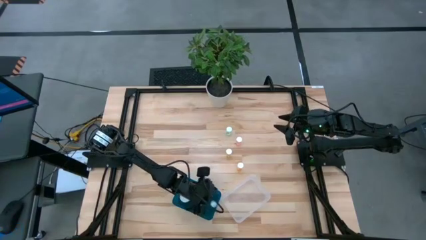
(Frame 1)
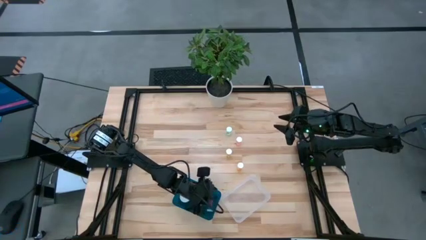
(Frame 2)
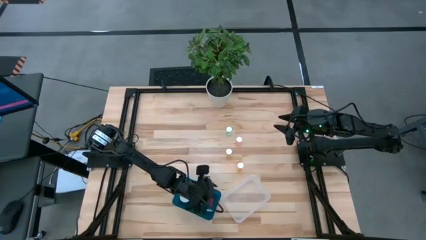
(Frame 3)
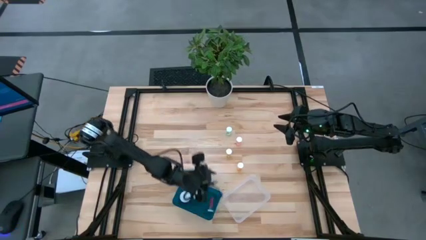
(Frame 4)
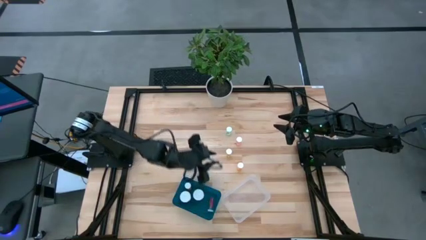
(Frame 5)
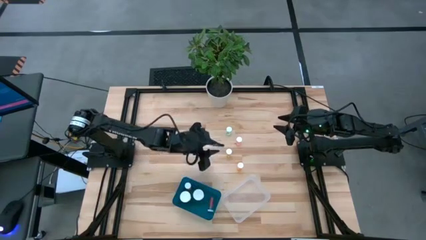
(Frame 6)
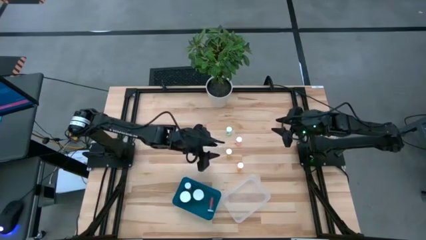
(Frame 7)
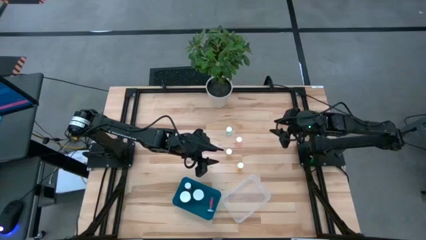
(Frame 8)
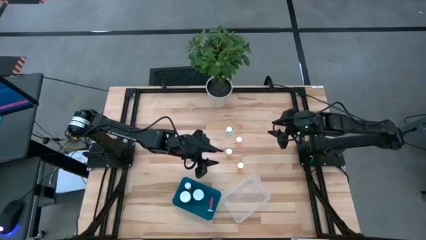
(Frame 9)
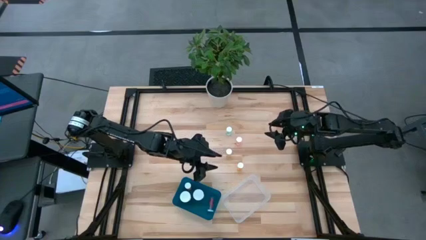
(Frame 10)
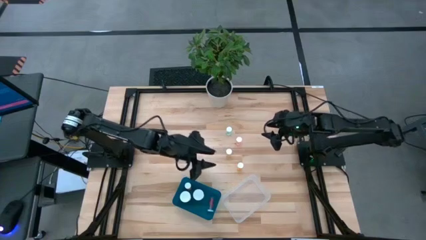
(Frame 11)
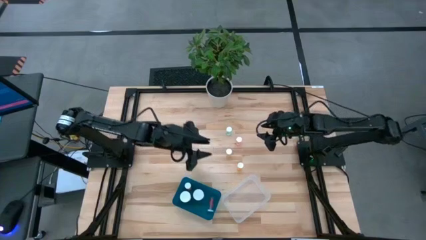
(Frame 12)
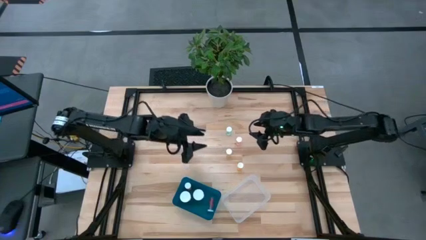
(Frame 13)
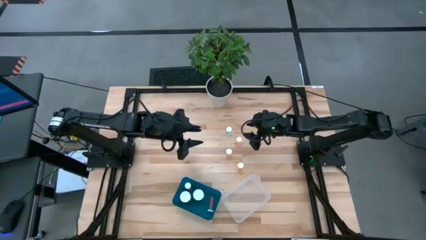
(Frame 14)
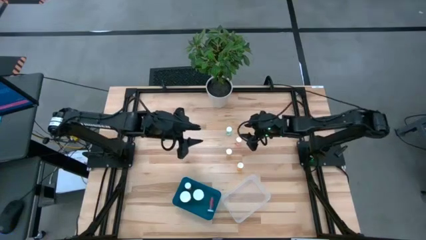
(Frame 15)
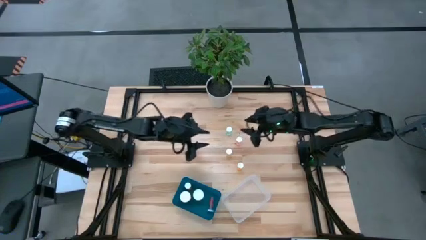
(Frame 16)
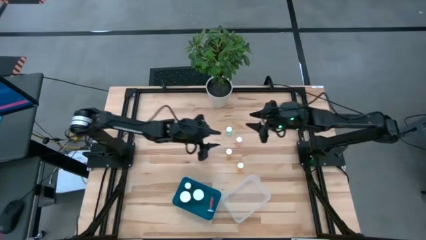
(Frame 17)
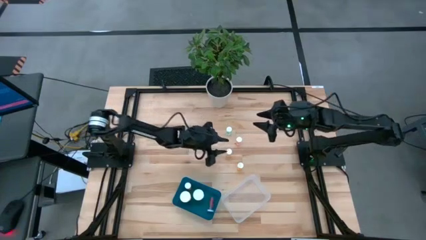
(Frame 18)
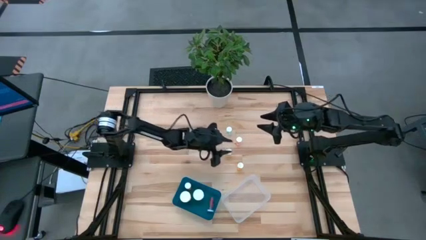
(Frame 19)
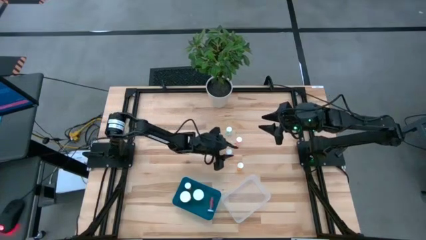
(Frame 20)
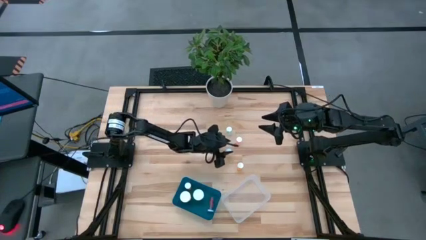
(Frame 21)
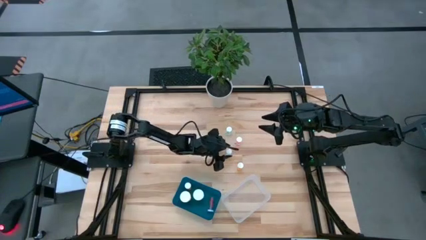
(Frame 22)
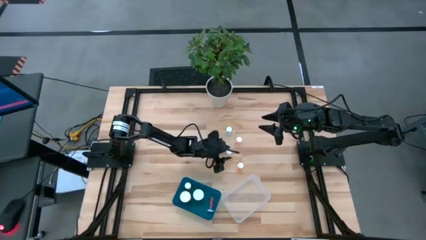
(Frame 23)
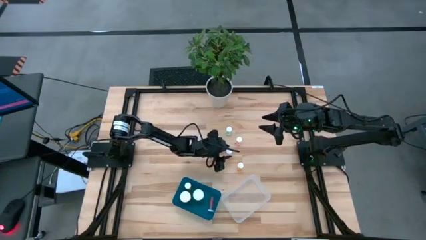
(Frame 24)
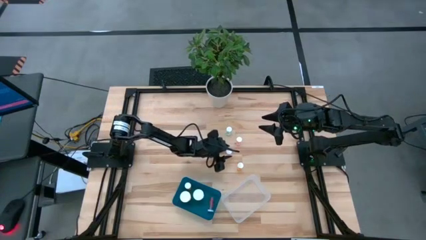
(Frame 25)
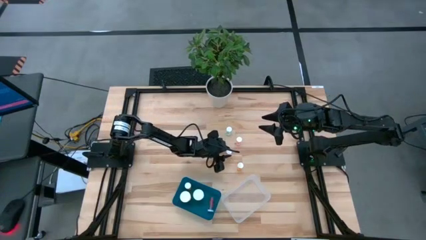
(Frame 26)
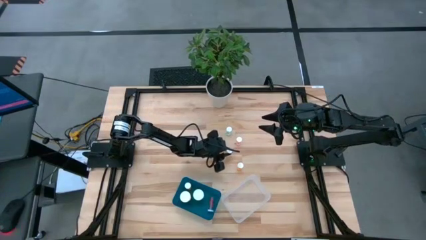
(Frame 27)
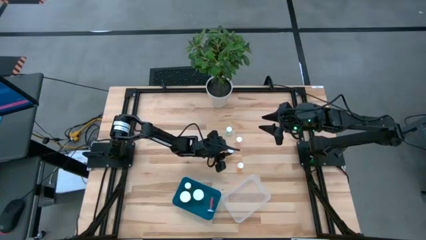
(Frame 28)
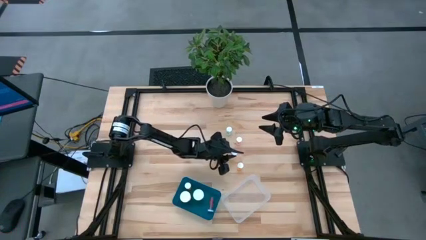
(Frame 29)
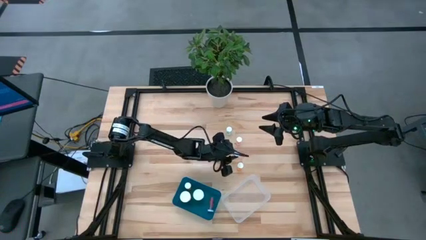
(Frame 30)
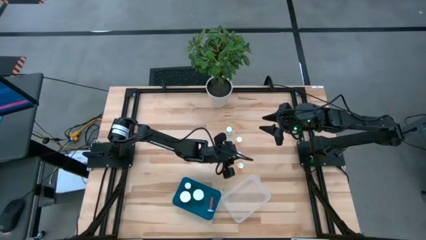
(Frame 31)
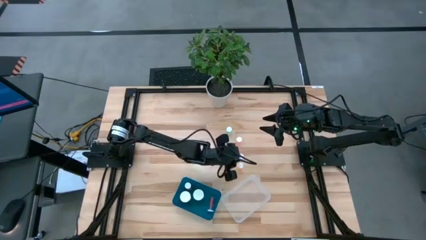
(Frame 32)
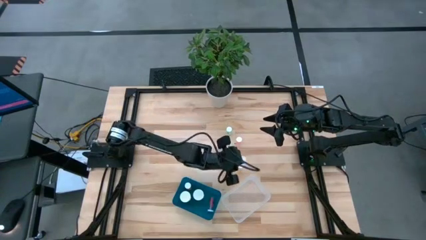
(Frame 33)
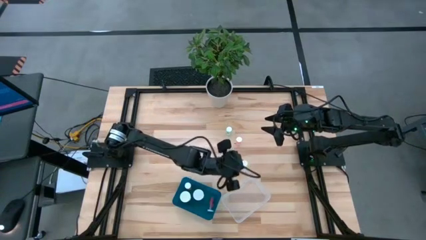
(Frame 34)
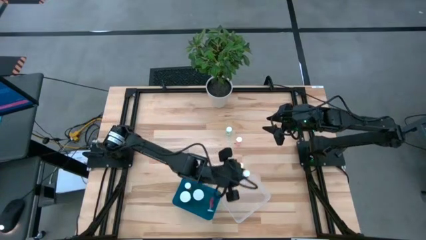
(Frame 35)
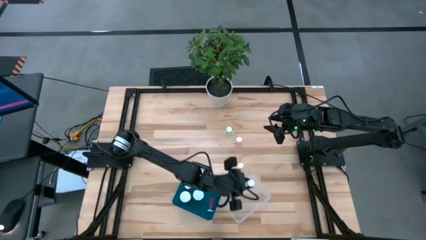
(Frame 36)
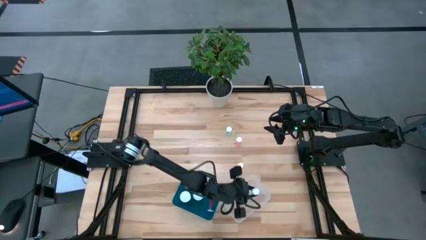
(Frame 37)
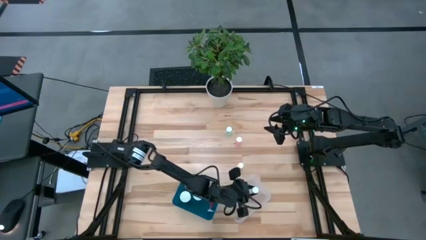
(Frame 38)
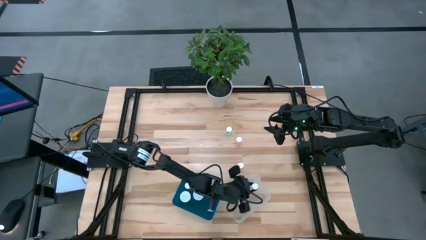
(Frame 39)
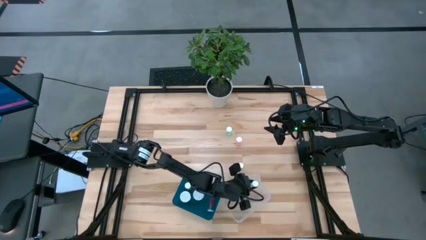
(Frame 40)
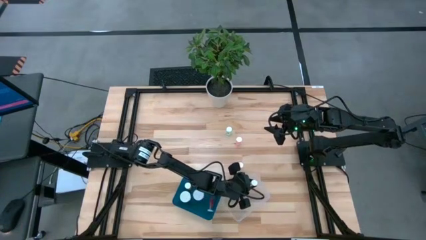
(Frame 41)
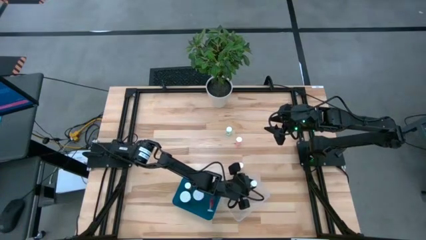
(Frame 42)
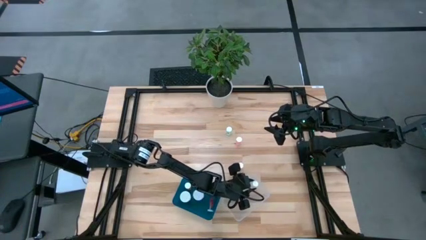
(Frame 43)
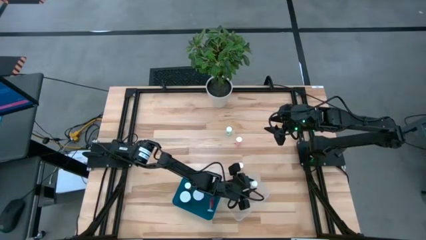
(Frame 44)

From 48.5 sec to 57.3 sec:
Task: Pick and place medicine bottles into bin by pill shape (circle, oval)
Put small yellow pill bottle into the transparent bin

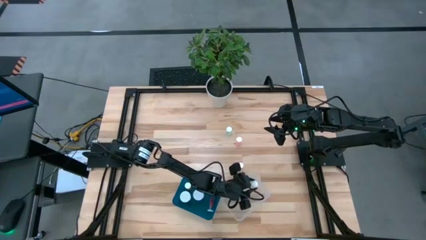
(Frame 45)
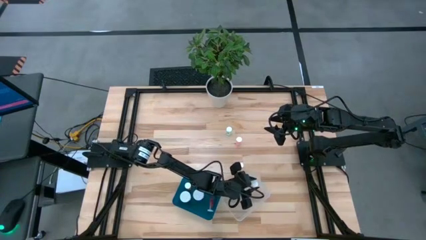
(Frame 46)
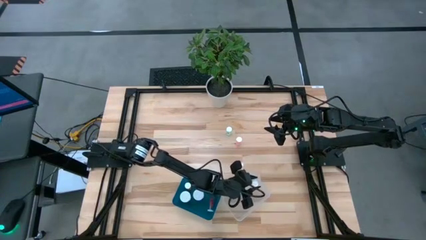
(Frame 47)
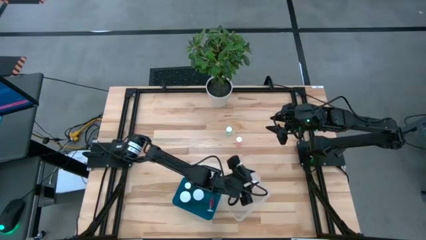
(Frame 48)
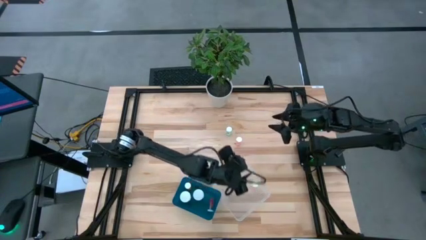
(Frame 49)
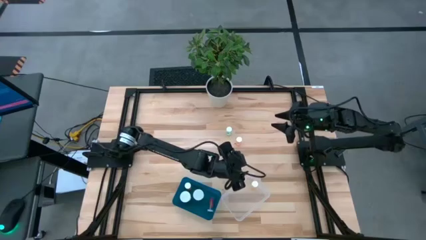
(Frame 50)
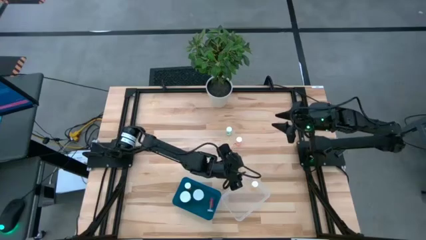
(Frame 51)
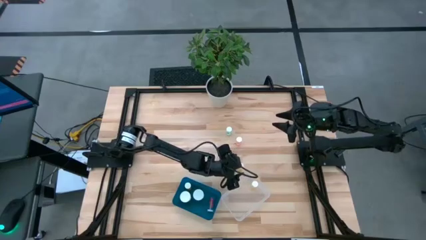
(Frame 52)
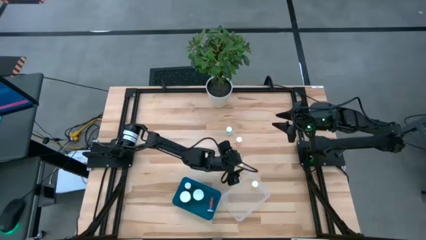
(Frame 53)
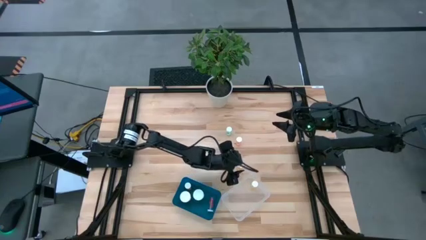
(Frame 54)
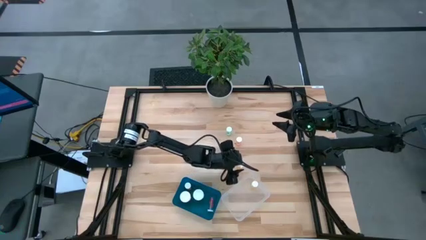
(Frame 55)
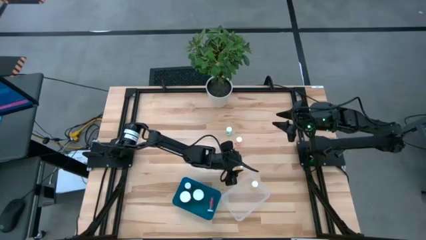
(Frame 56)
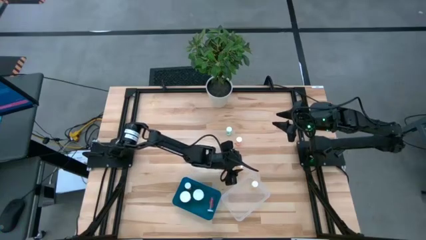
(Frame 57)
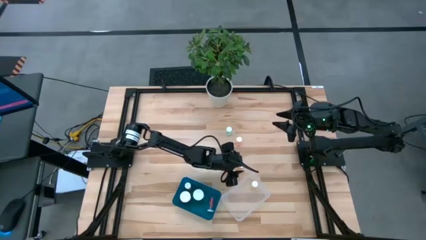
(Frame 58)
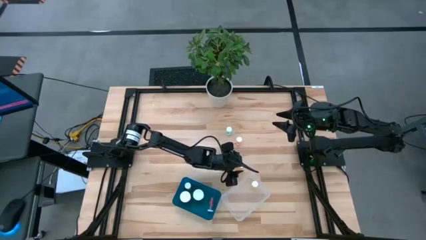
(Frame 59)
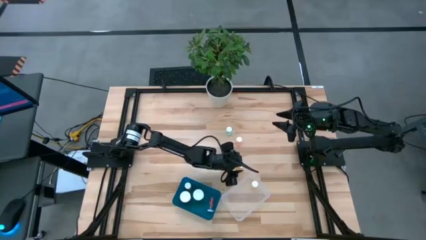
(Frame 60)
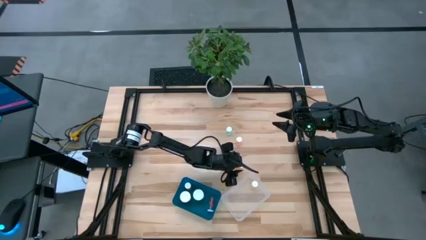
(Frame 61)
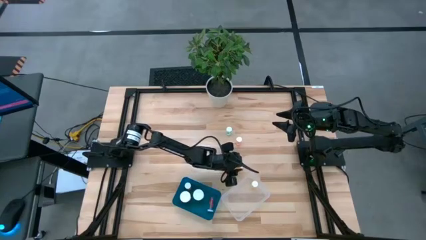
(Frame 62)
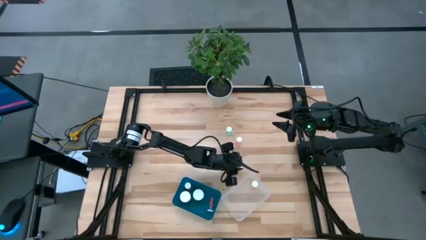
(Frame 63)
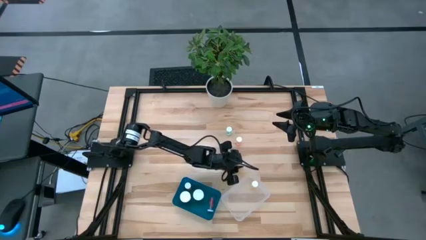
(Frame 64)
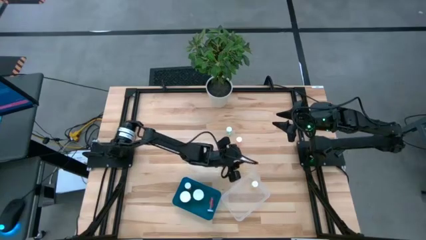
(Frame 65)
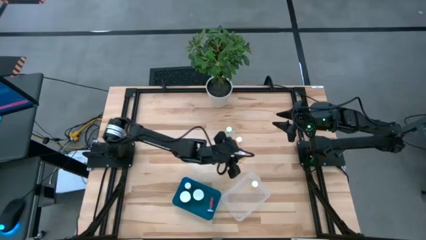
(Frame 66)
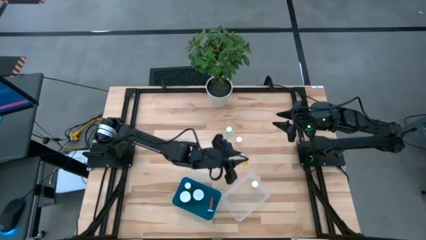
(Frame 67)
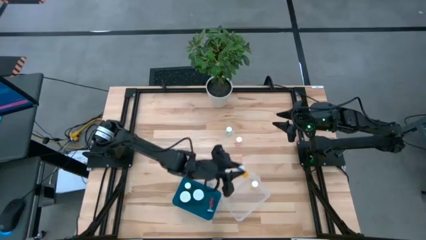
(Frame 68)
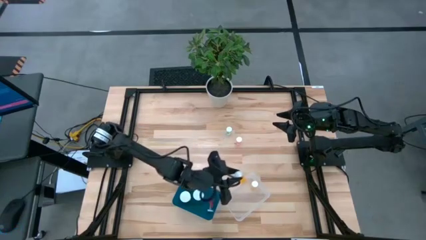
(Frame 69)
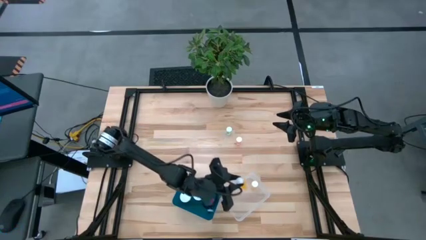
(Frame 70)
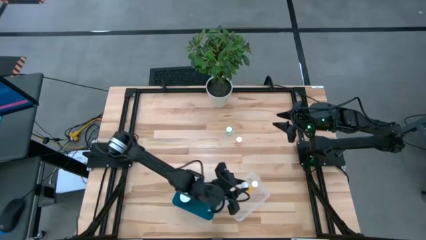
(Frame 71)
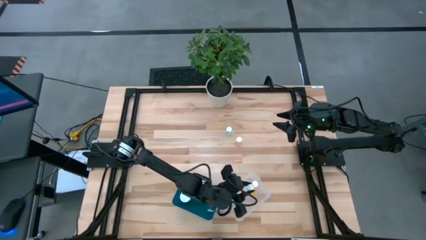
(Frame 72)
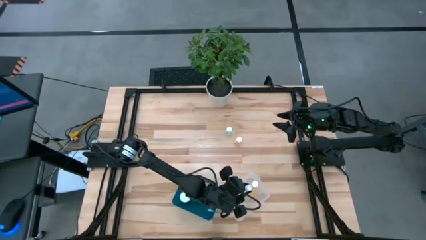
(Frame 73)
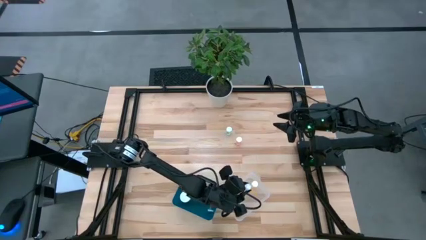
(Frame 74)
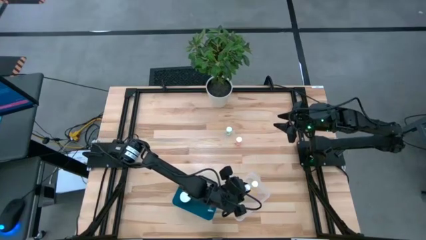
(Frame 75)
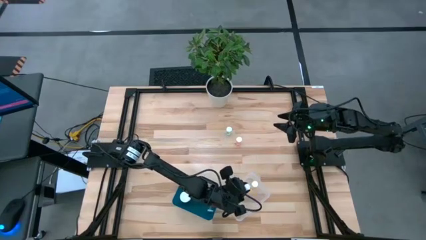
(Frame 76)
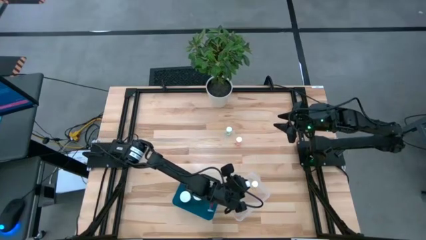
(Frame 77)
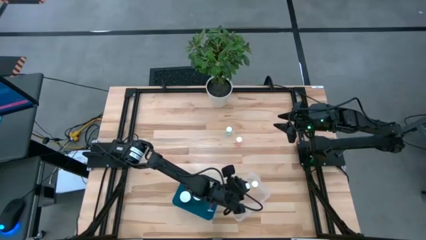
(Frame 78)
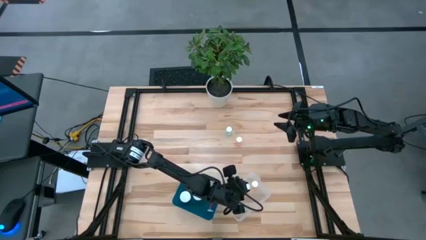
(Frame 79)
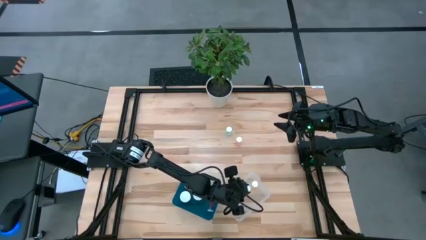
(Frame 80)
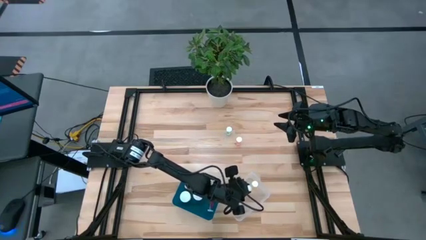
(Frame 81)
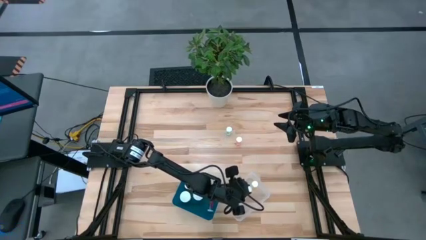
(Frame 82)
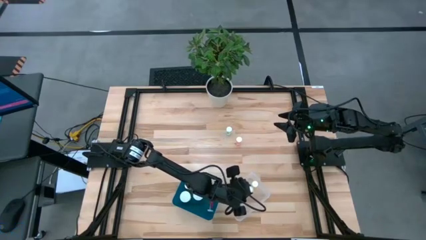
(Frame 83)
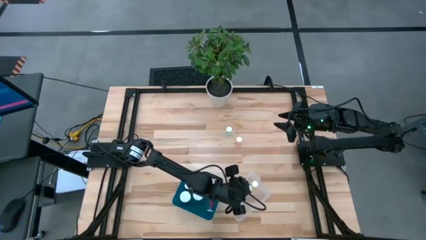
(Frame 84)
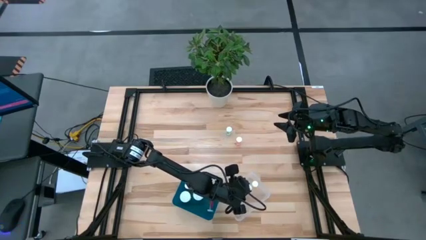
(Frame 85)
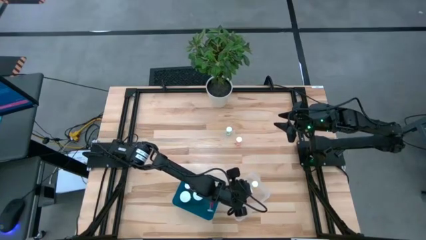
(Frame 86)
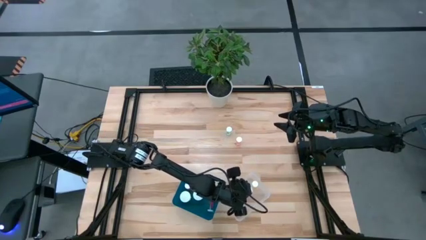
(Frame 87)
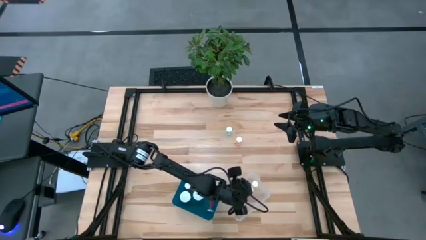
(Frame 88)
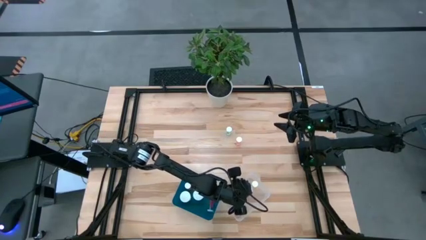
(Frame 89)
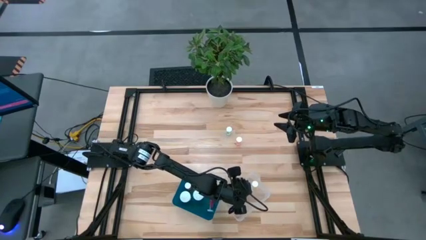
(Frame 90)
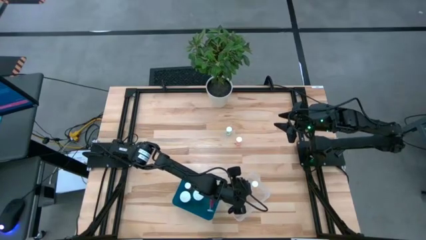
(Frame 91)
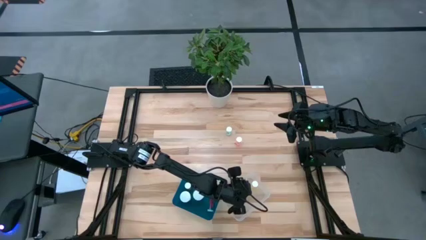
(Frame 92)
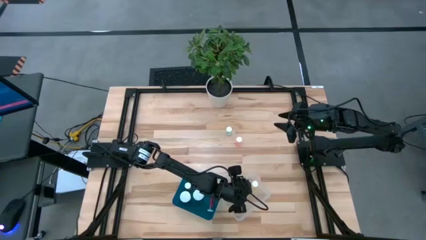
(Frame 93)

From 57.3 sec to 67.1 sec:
Put the small orange pill bottle into the transparent bin
